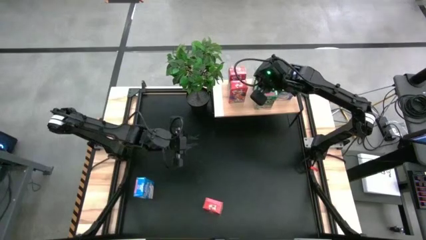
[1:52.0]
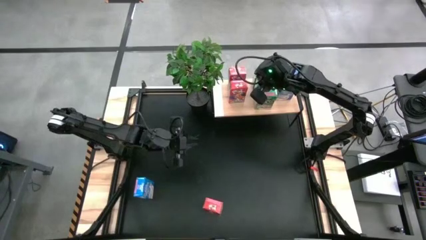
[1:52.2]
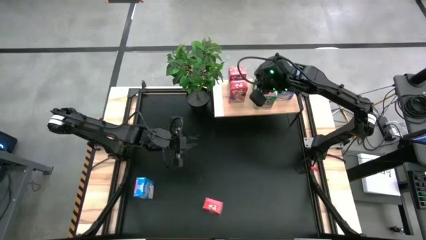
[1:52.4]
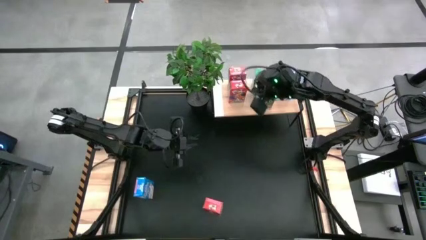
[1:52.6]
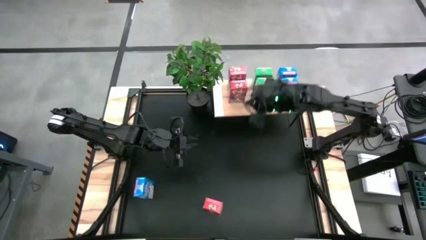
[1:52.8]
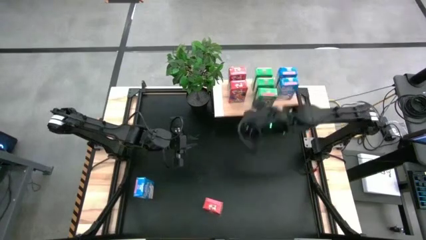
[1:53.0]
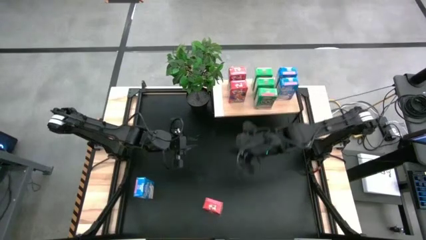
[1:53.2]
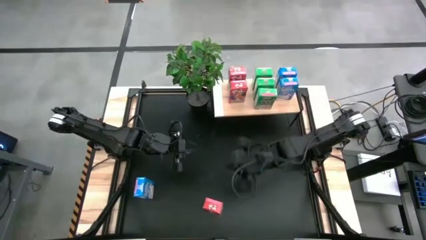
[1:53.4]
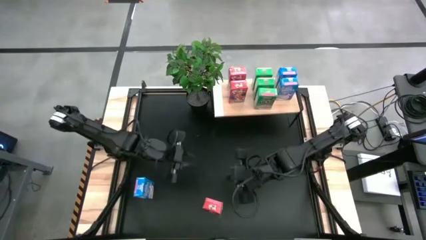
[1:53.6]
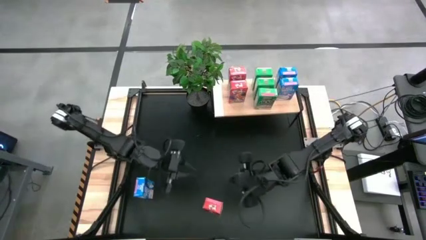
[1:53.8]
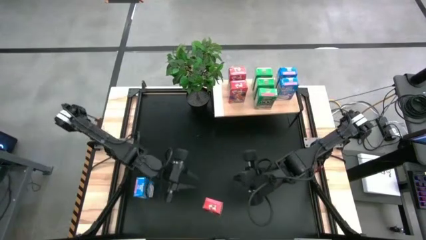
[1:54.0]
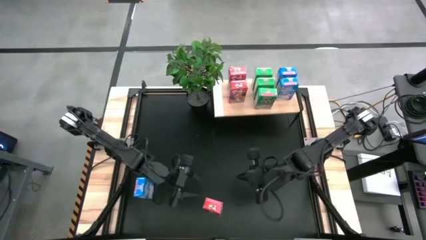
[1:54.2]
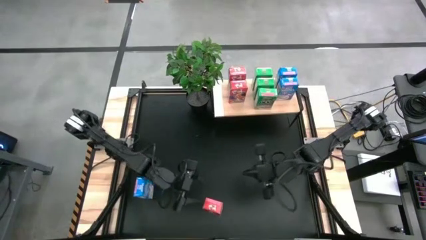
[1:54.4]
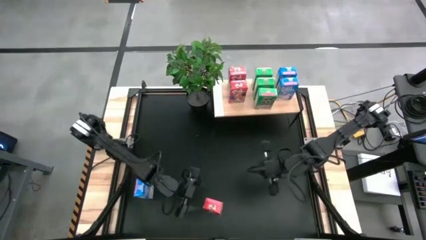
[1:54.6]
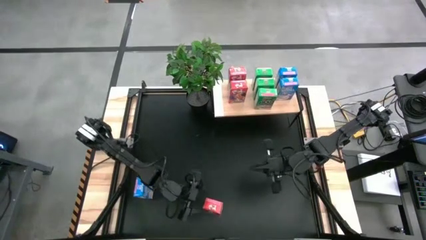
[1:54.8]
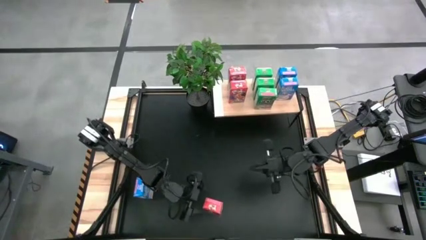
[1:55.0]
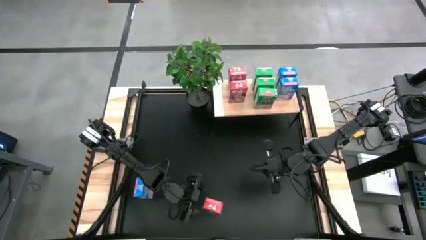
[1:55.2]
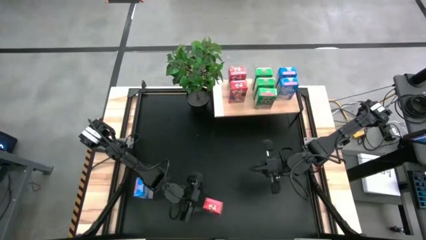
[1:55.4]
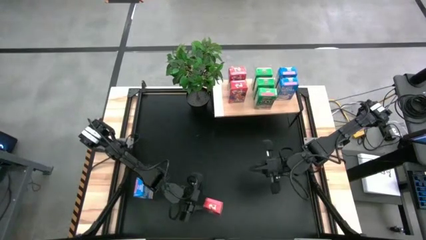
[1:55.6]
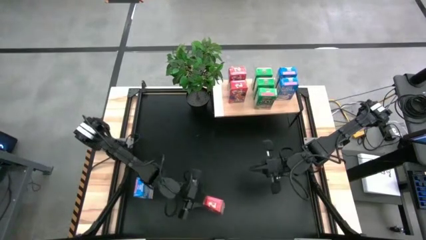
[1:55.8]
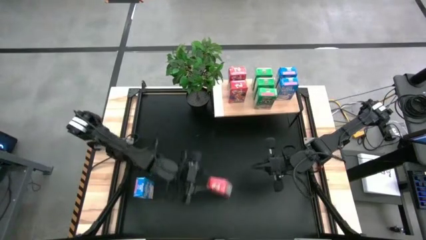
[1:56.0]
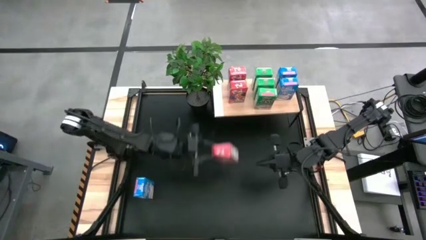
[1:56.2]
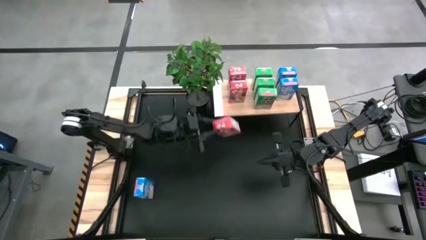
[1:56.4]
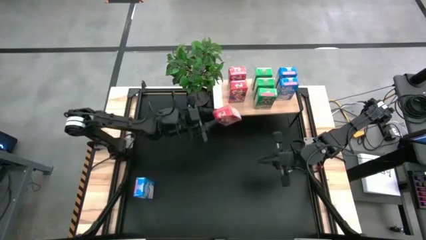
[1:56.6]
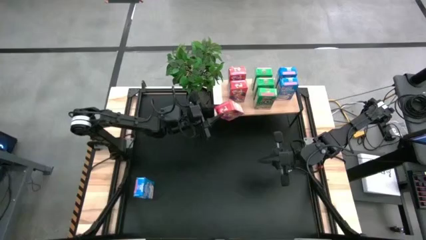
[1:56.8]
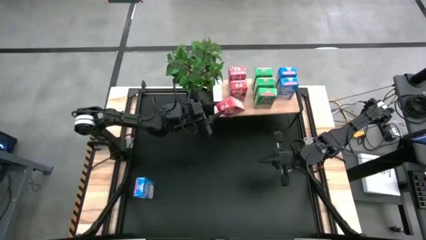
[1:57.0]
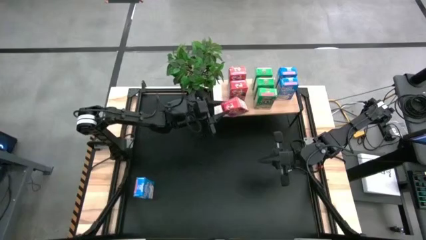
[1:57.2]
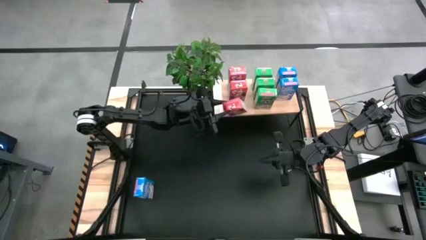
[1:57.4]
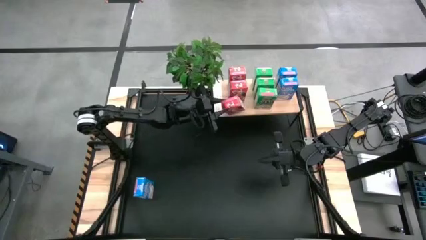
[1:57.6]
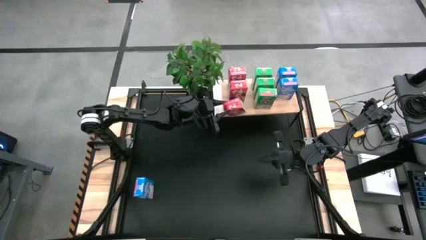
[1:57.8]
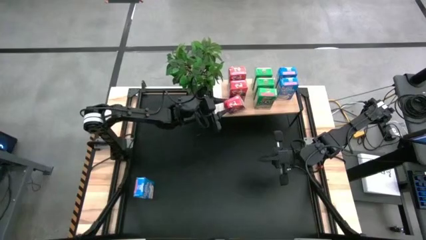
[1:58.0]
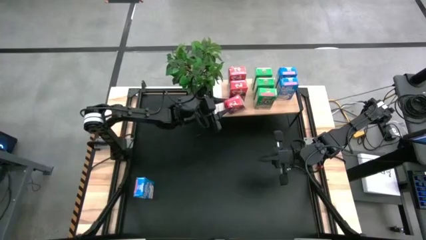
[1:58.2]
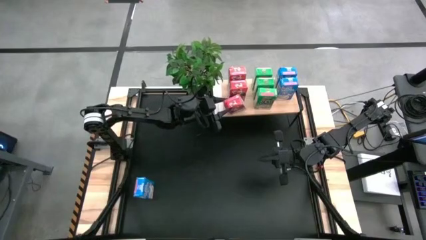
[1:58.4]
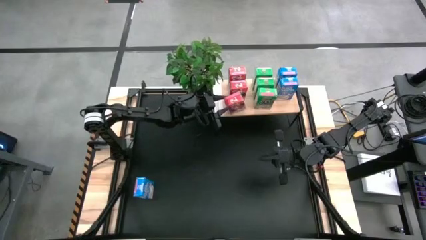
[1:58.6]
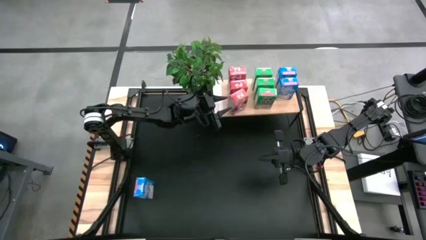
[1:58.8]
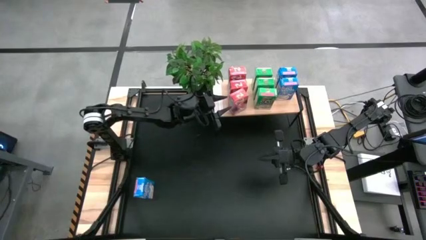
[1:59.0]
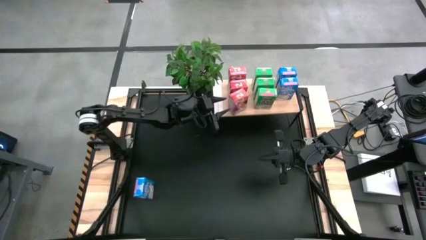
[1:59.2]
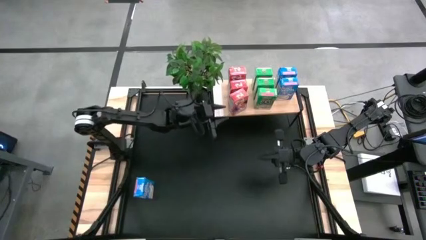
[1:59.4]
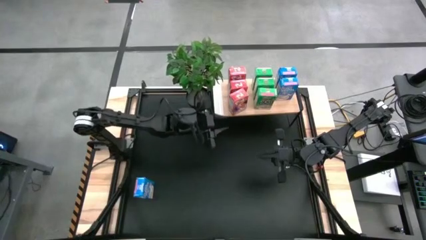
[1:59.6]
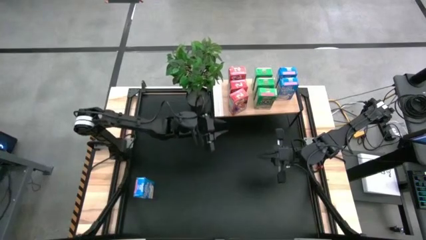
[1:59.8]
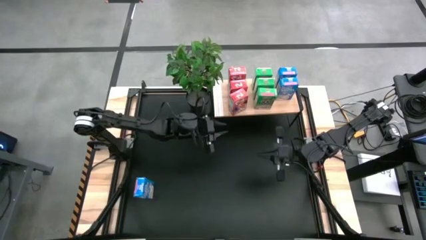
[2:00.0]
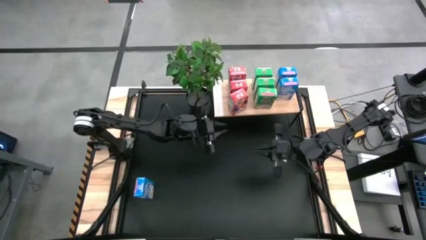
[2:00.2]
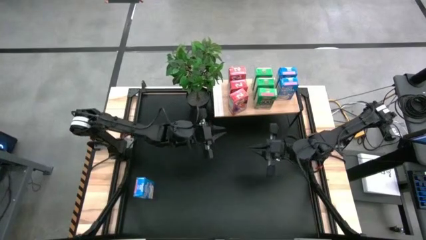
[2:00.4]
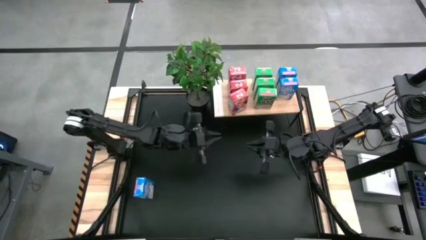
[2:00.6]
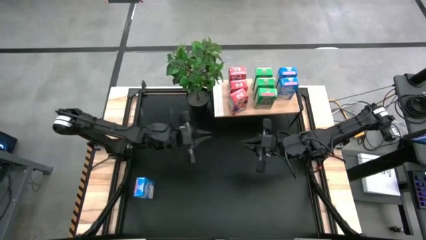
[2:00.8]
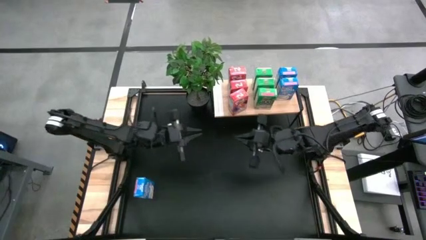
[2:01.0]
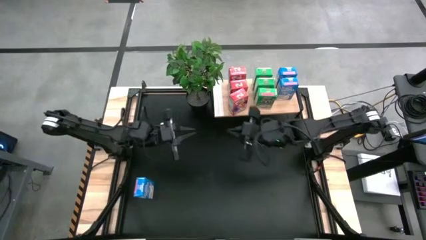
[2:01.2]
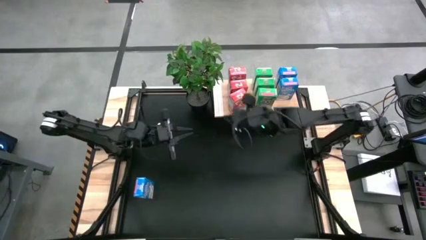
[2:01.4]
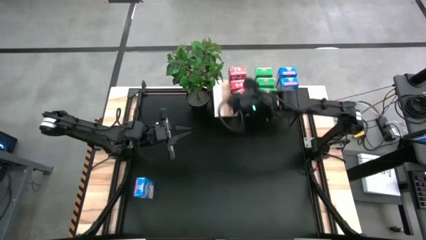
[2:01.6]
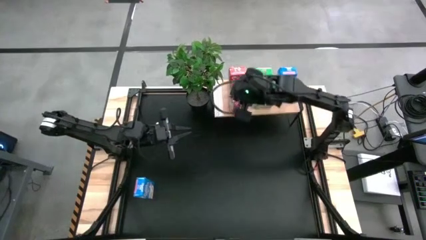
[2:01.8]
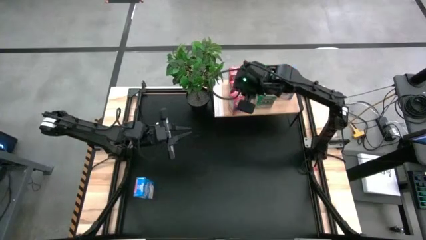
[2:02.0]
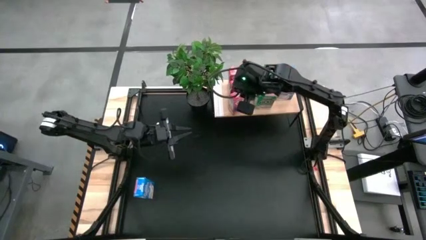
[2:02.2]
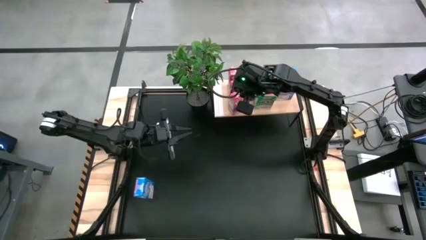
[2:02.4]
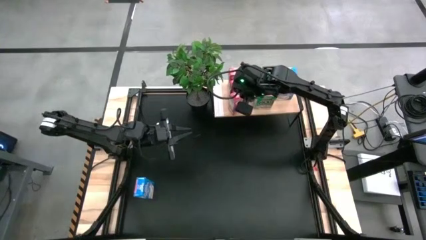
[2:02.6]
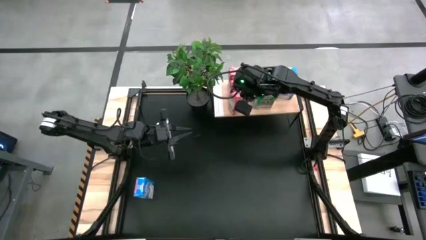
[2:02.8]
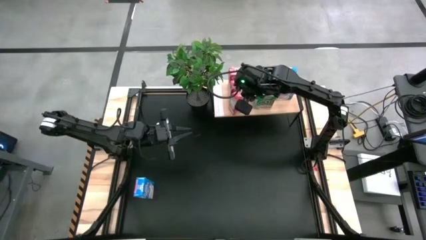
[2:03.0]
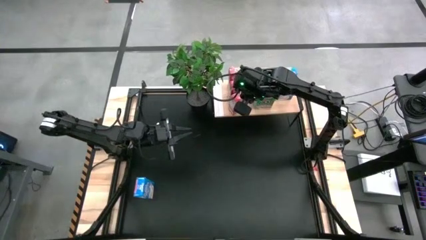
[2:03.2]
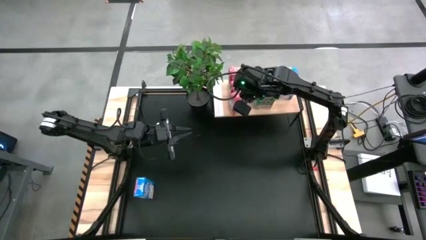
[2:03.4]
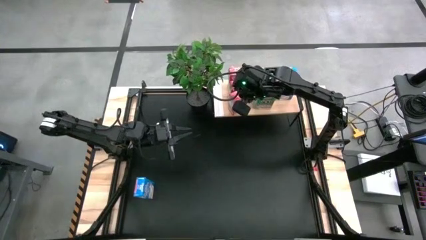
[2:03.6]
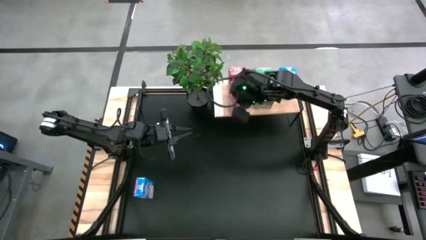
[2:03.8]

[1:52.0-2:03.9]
Task: Stack cereal on shelf
Put the red cereal box on the shelf
